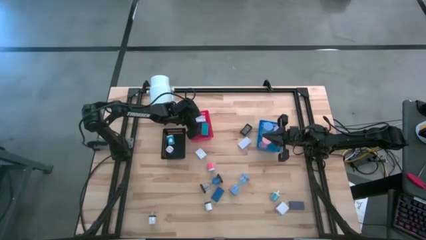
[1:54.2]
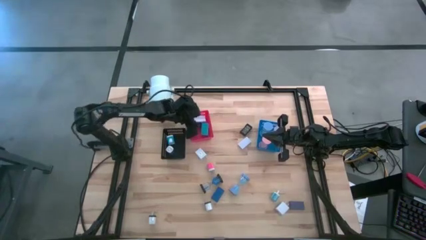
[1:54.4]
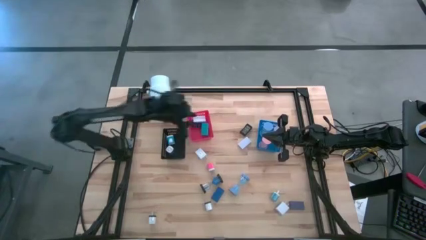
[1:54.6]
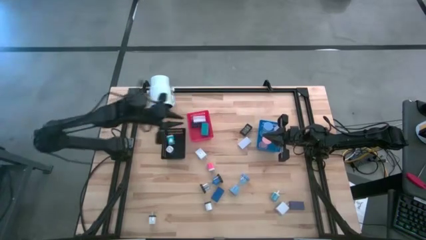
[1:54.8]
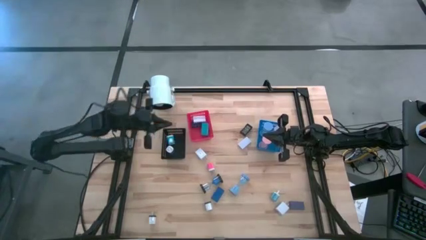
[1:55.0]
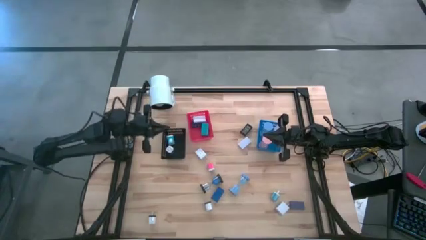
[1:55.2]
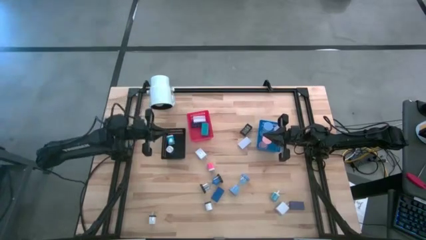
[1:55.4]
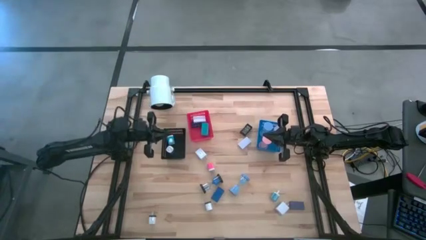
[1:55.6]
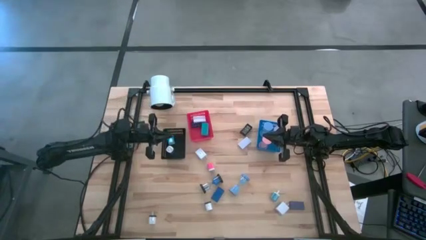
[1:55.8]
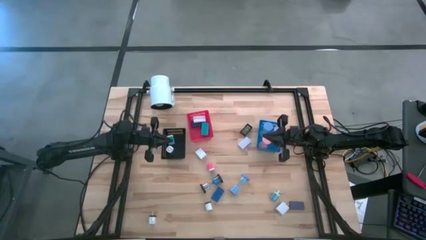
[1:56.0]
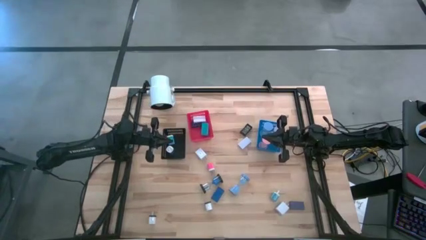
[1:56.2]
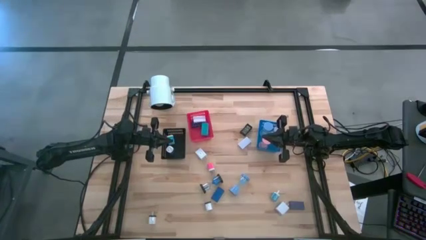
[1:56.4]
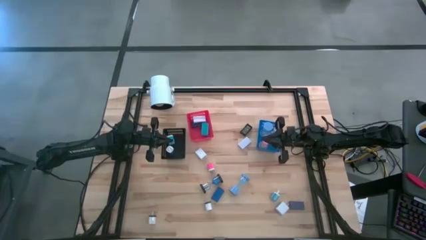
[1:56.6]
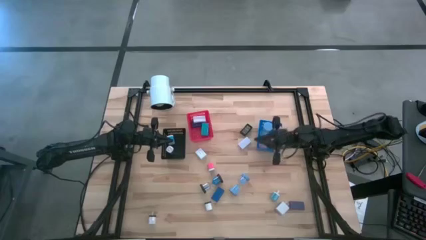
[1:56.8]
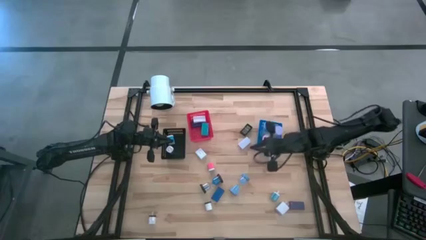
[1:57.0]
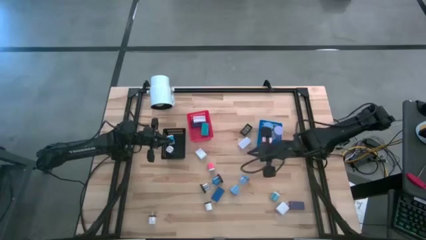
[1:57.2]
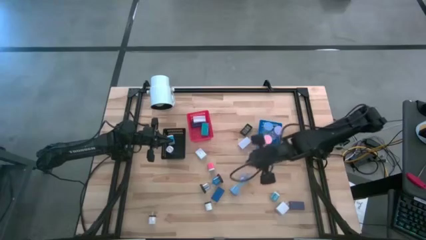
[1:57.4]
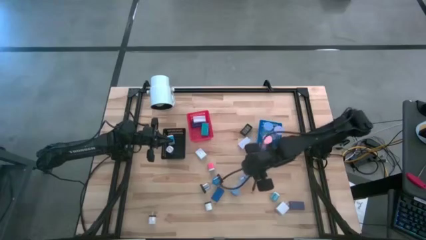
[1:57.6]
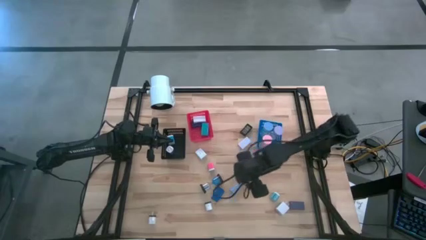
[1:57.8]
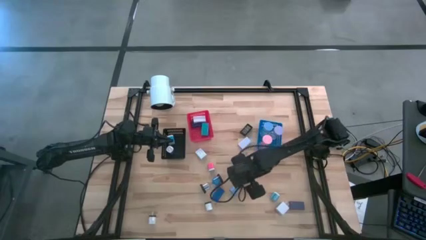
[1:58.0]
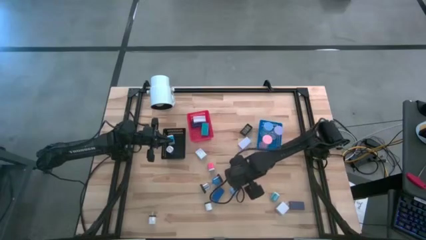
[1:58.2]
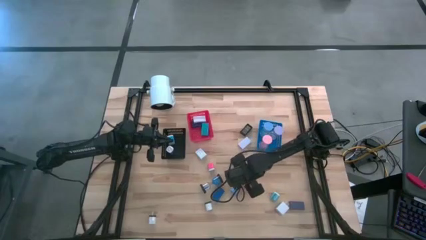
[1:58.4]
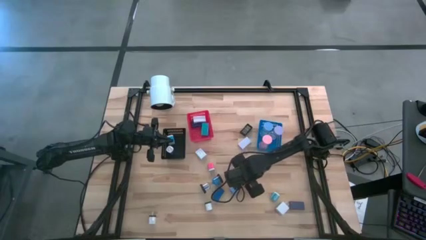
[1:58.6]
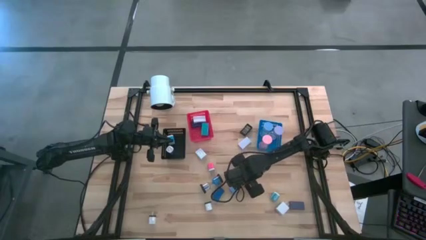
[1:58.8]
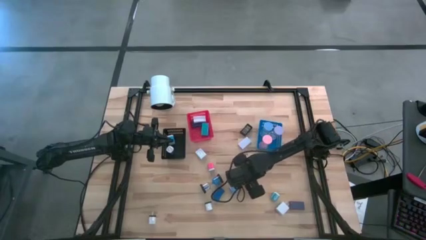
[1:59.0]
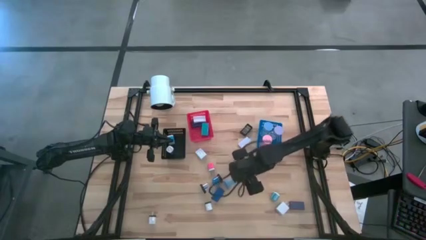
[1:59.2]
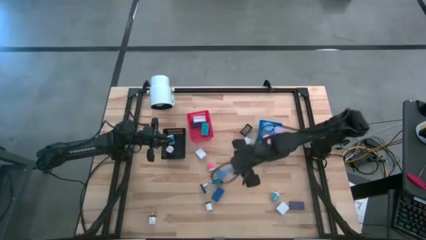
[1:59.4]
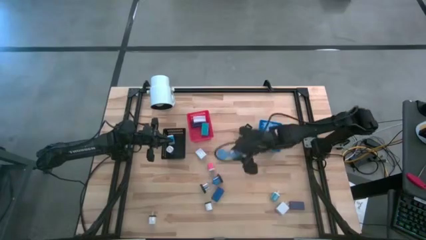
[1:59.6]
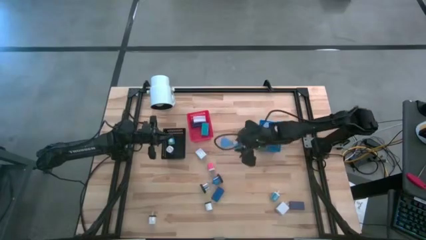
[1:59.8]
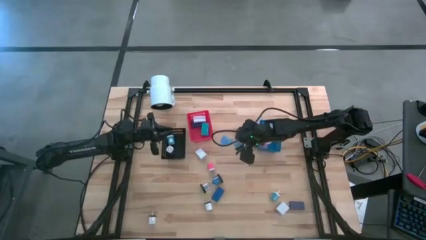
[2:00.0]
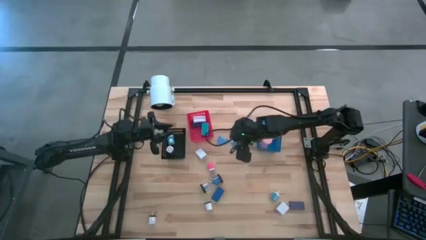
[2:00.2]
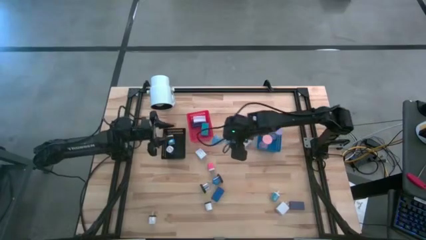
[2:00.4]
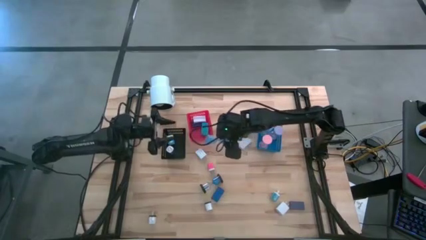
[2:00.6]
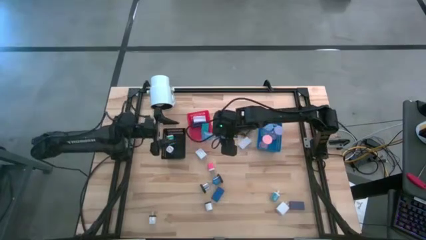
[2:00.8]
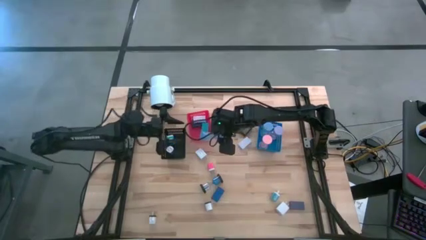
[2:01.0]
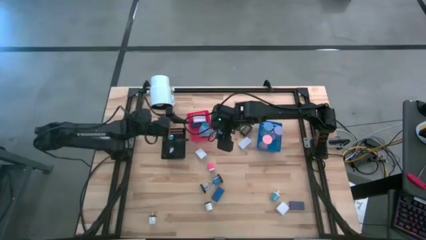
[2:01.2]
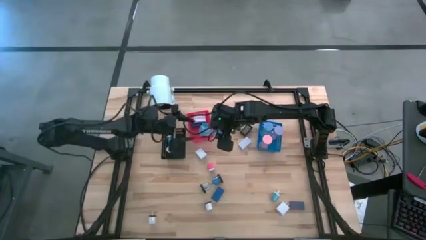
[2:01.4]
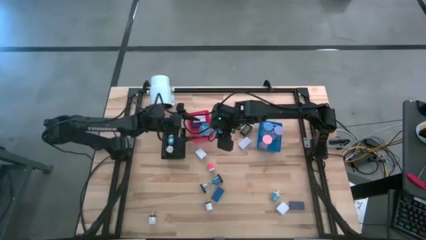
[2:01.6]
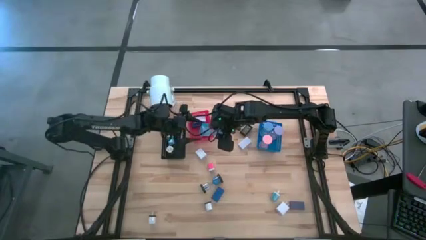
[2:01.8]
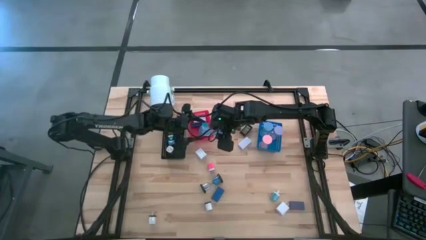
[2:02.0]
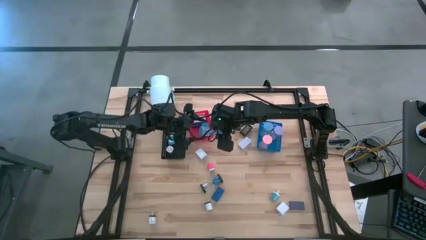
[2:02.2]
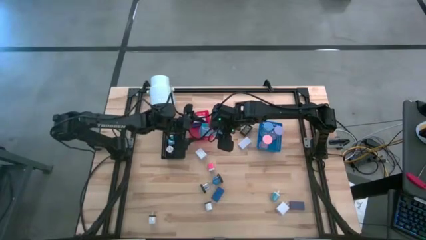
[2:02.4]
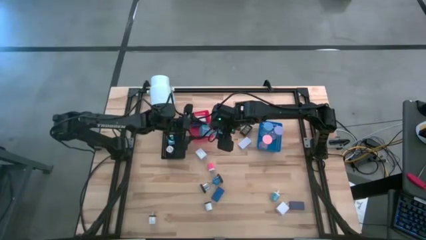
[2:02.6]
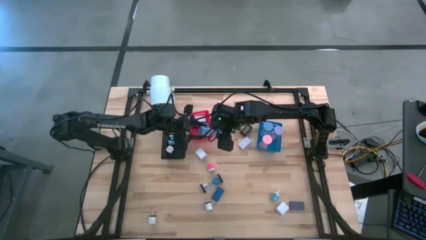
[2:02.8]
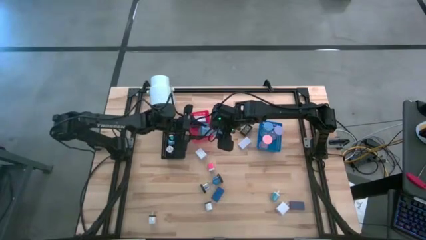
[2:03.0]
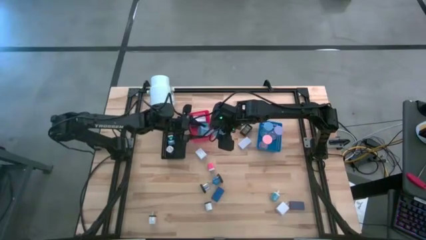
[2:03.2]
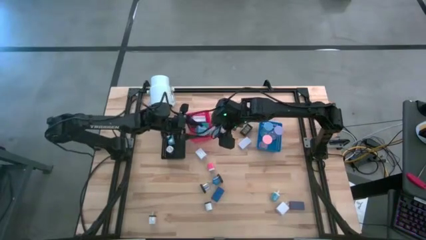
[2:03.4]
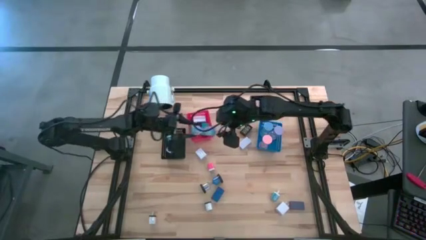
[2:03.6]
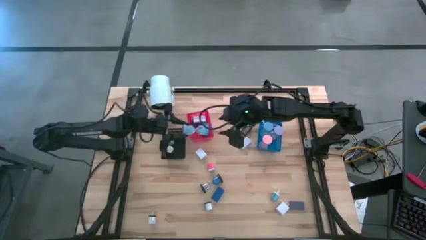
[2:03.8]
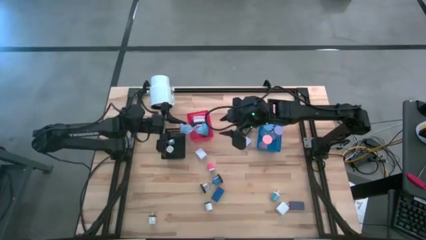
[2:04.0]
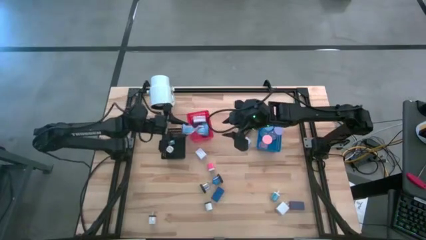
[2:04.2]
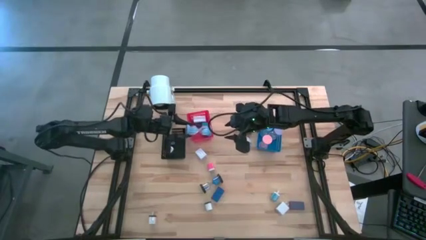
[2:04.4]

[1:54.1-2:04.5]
Task: Pick & Place Office items
Put the blue hourglass into the blue bin

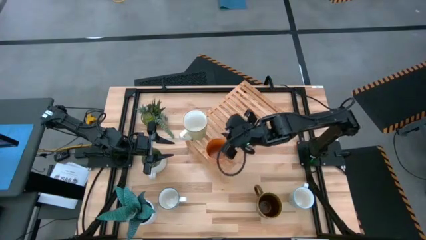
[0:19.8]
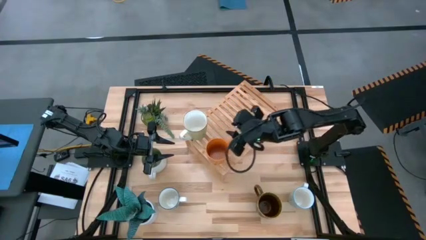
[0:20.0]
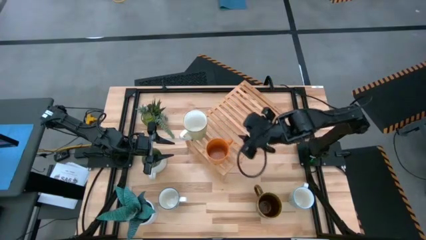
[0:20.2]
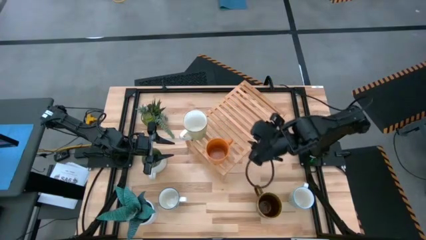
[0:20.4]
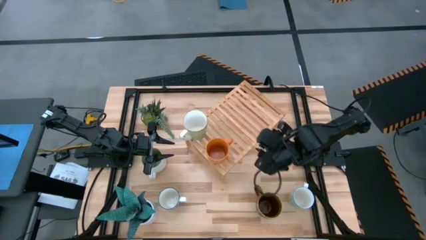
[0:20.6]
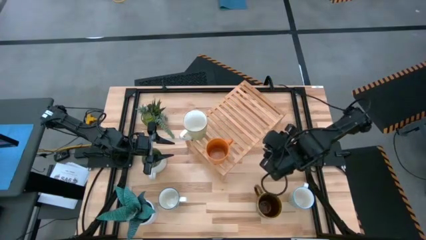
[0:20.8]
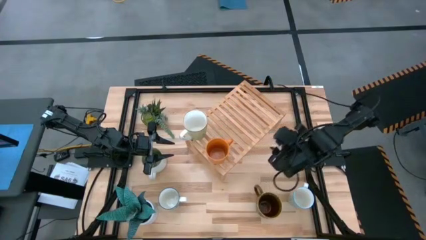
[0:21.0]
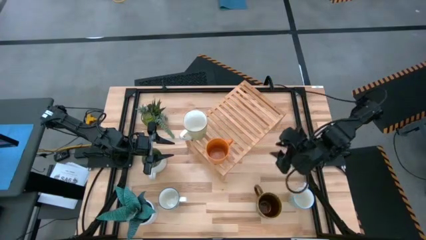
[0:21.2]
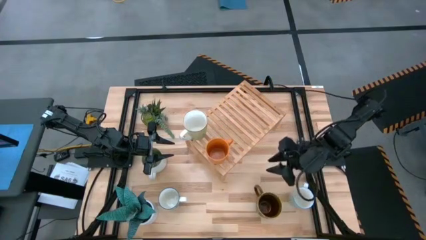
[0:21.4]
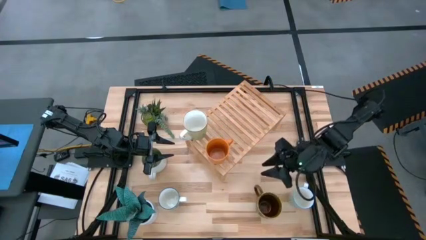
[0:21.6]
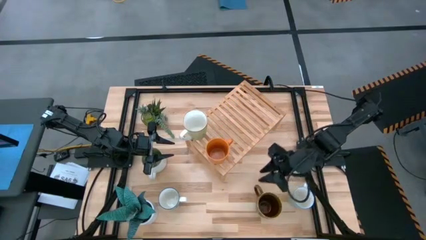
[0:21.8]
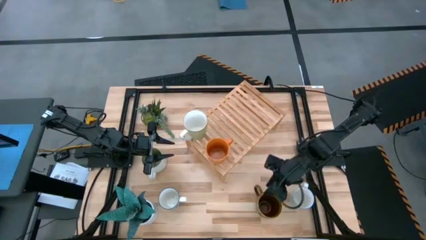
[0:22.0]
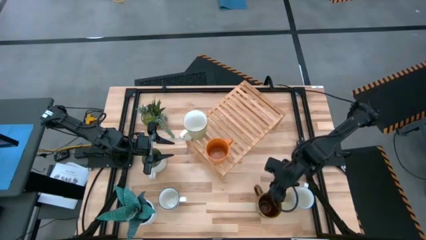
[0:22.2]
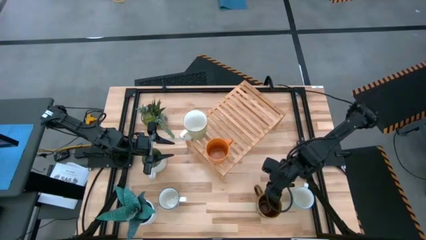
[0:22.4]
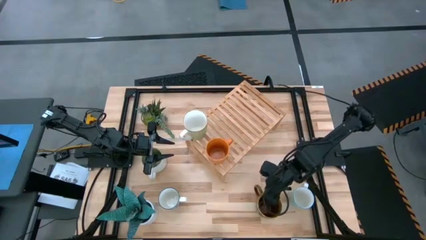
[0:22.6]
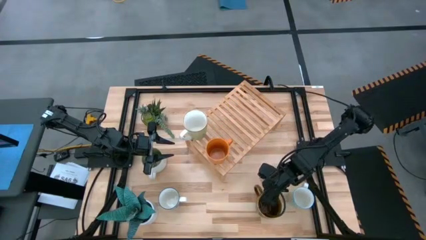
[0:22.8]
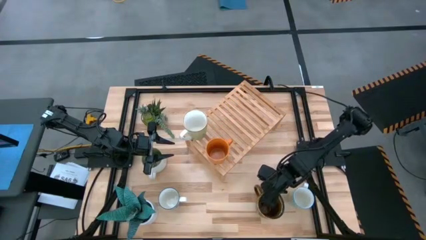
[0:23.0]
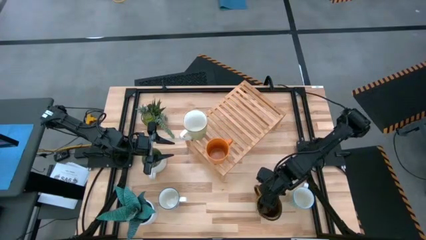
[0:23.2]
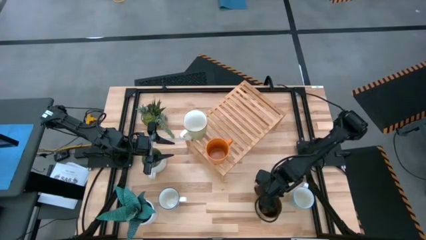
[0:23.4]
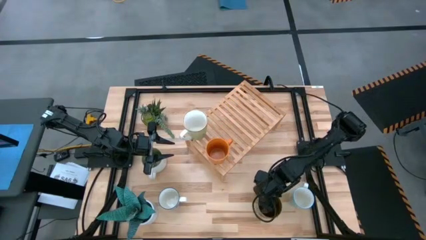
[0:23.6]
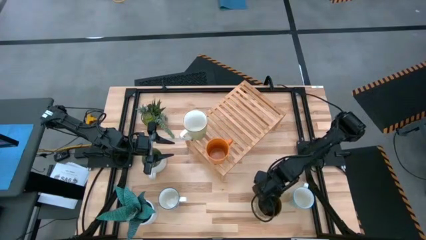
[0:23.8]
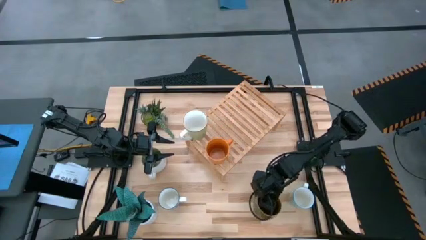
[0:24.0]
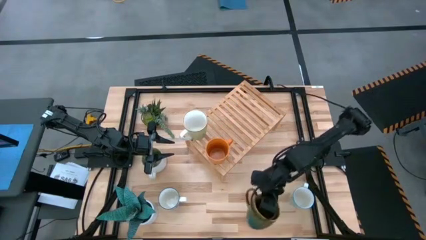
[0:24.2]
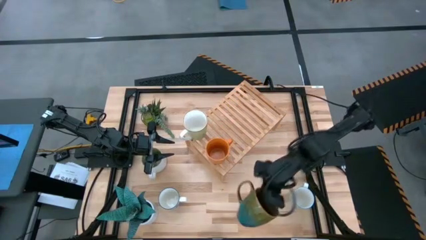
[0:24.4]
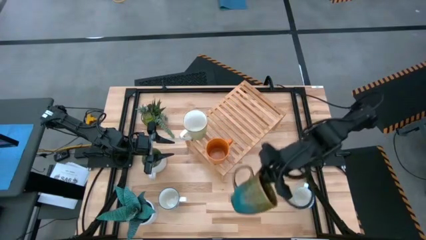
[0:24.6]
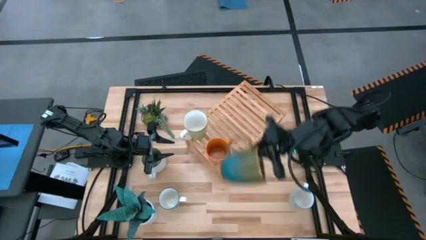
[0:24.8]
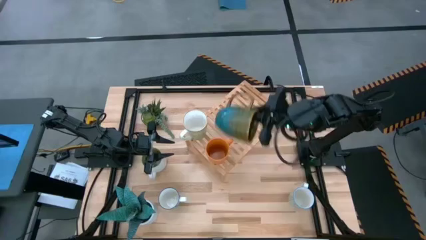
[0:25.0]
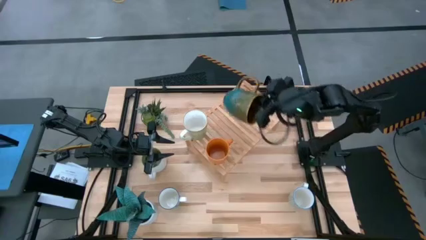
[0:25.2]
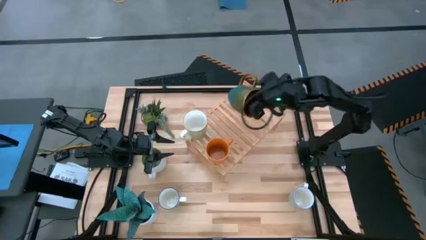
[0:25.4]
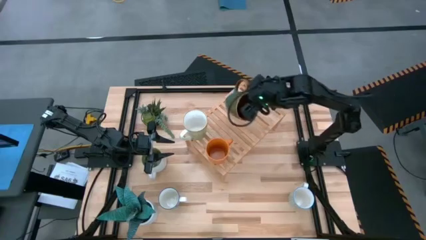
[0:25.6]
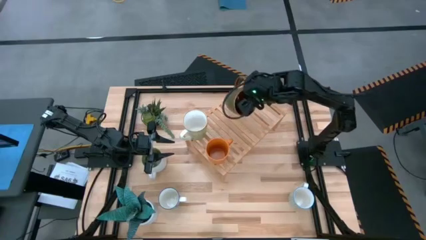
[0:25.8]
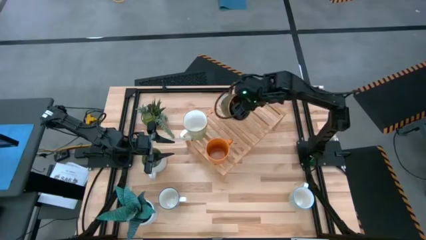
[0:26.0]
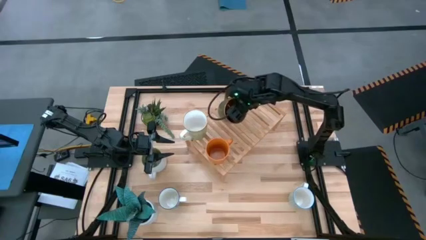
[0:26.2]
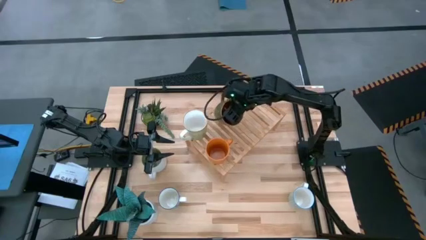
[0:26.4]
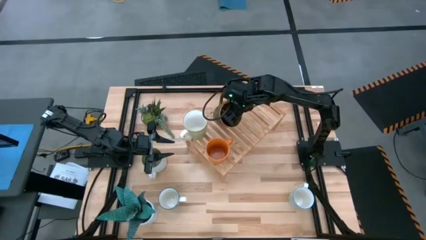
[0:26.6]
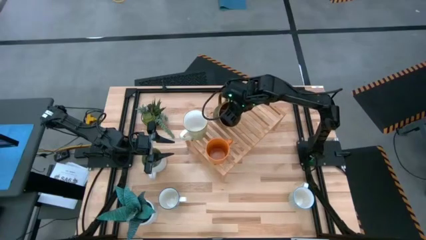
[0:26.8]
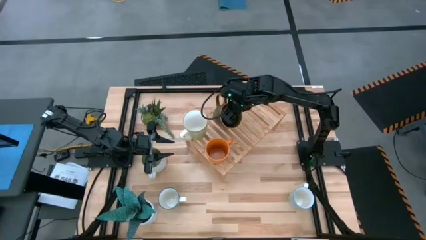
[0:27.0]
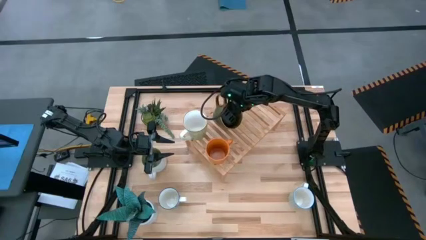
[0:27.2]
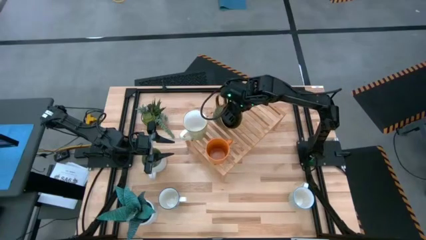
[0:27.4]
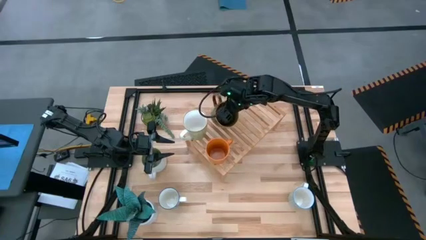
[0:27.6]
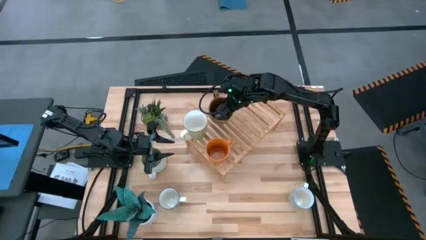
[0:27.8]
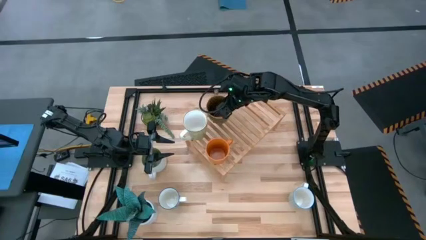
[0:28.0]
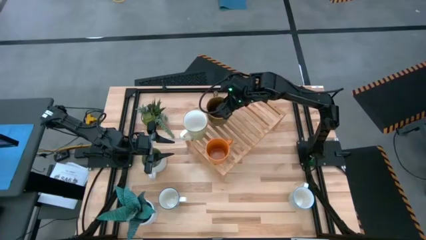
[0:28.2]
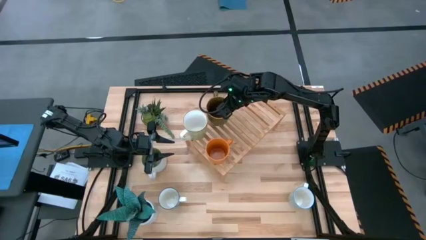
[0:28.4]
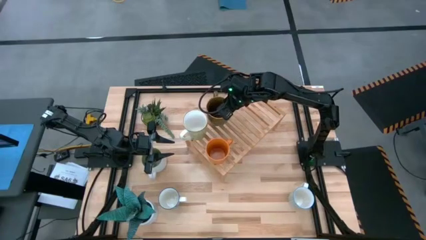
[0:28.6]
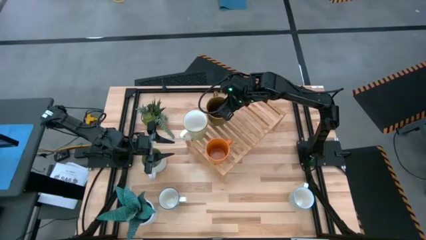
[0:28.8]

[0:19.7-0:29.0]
Task: Place coffee mugs
Put the brown mug on the shelf
